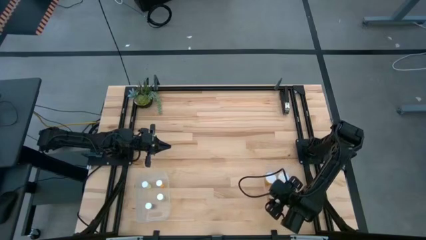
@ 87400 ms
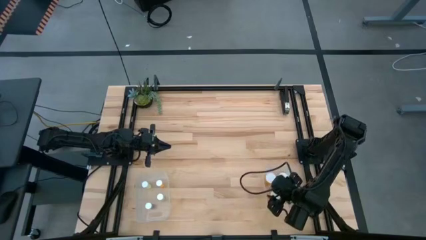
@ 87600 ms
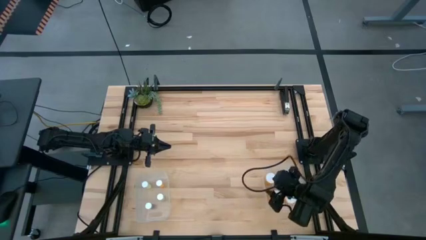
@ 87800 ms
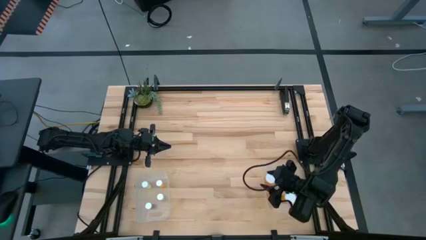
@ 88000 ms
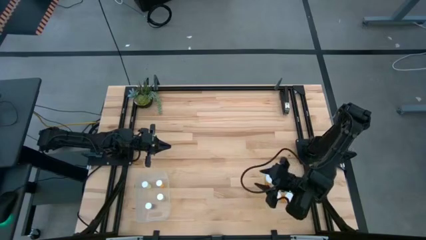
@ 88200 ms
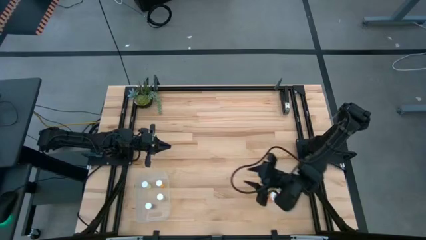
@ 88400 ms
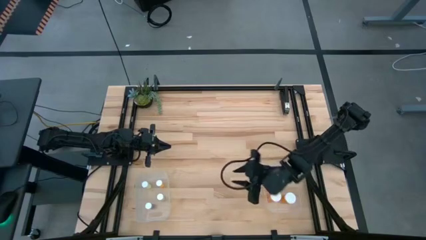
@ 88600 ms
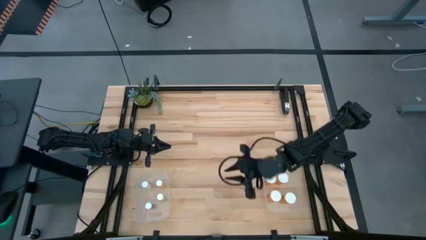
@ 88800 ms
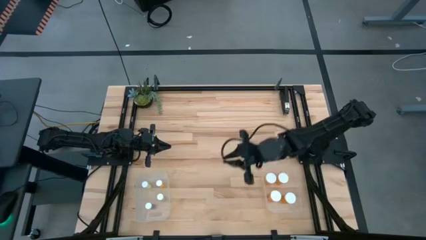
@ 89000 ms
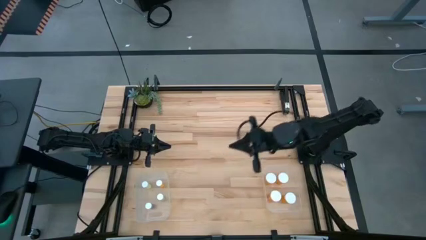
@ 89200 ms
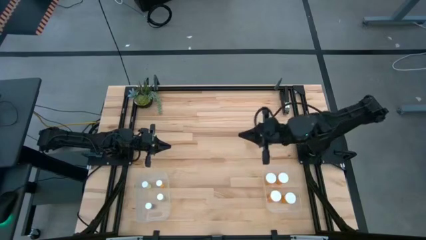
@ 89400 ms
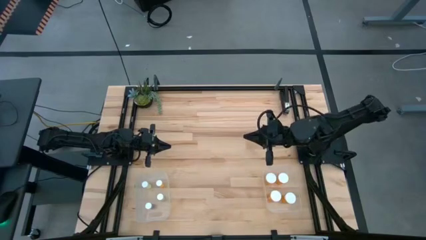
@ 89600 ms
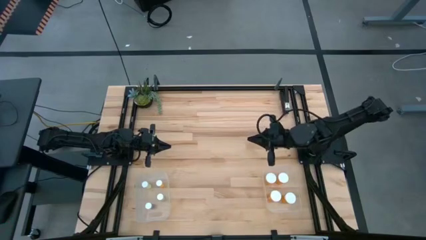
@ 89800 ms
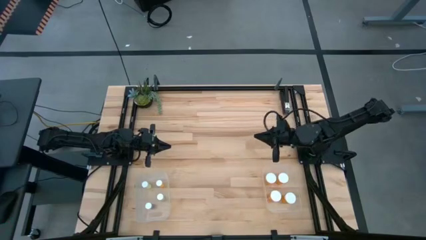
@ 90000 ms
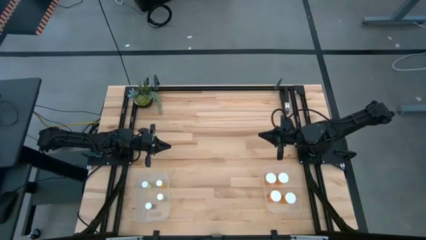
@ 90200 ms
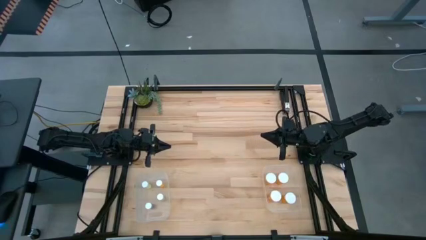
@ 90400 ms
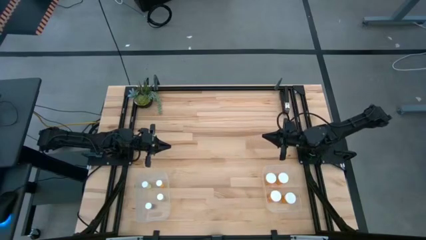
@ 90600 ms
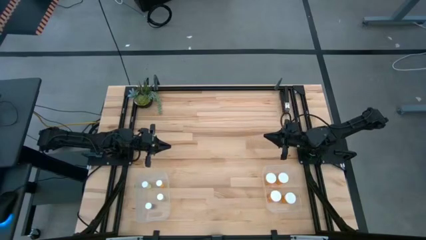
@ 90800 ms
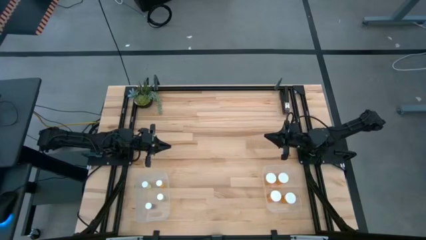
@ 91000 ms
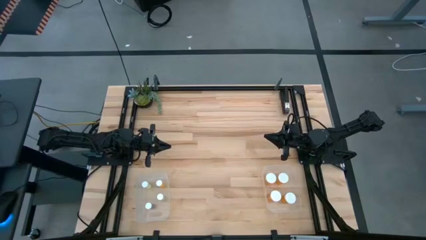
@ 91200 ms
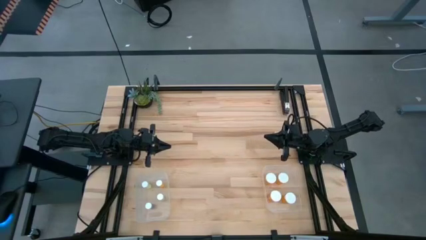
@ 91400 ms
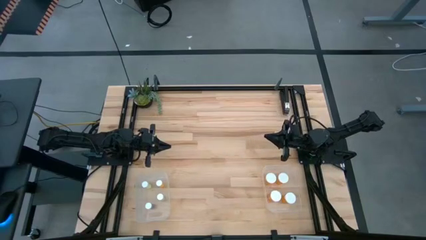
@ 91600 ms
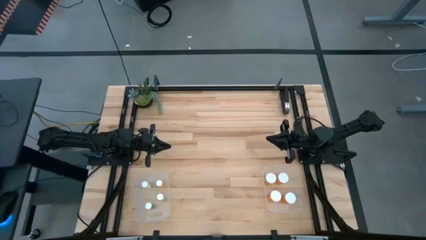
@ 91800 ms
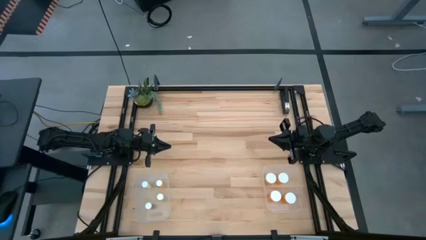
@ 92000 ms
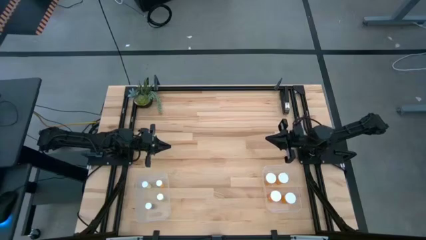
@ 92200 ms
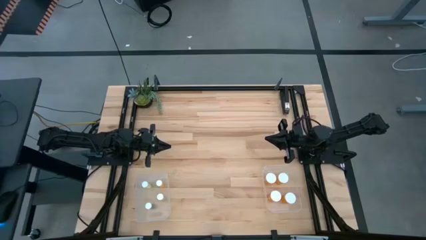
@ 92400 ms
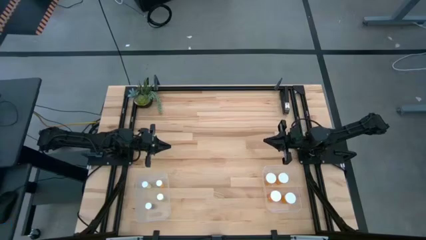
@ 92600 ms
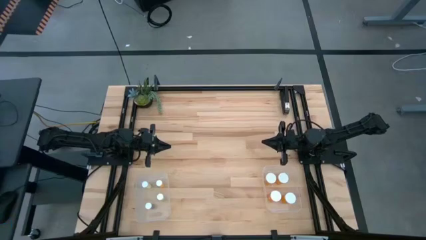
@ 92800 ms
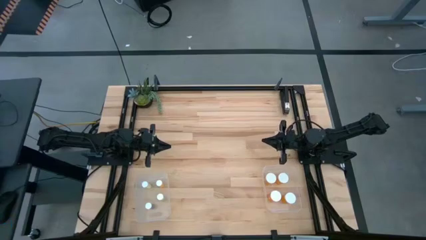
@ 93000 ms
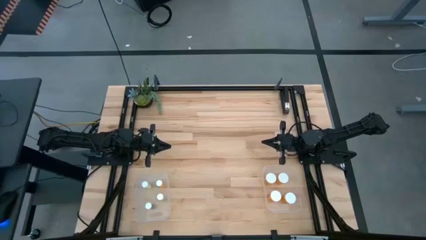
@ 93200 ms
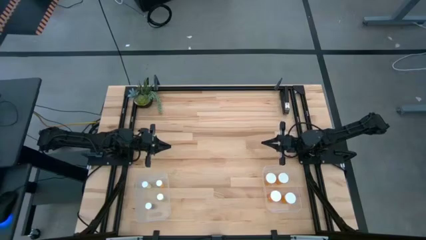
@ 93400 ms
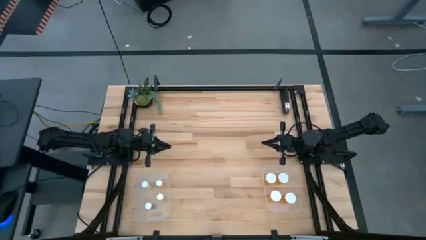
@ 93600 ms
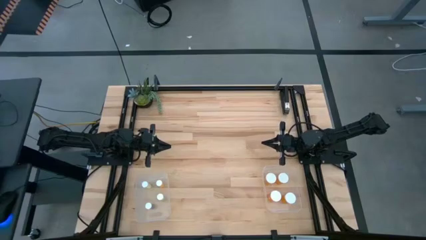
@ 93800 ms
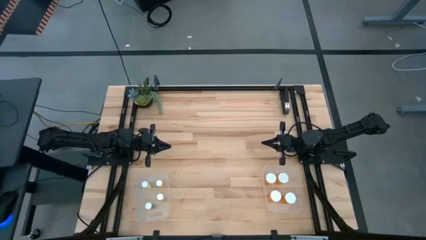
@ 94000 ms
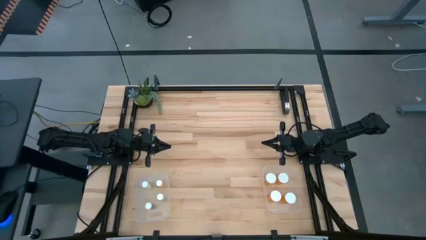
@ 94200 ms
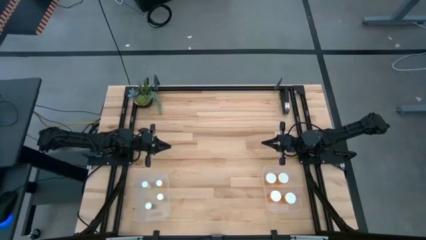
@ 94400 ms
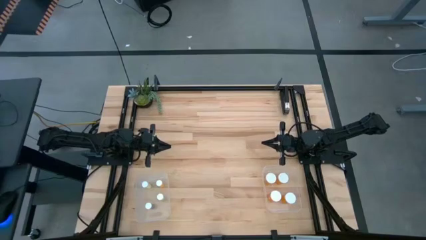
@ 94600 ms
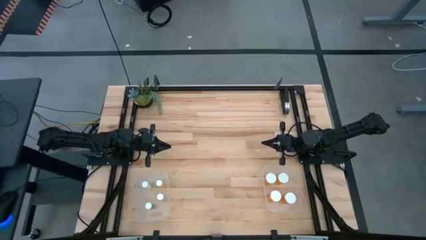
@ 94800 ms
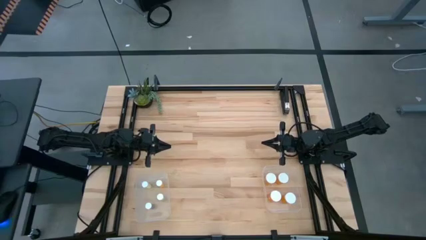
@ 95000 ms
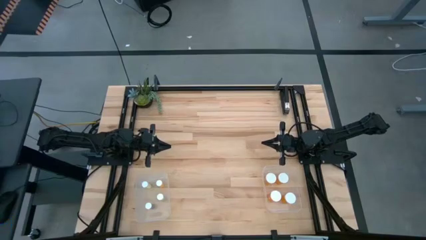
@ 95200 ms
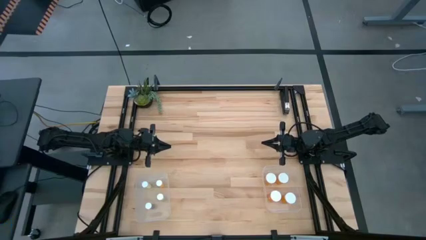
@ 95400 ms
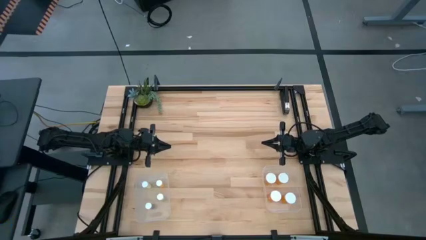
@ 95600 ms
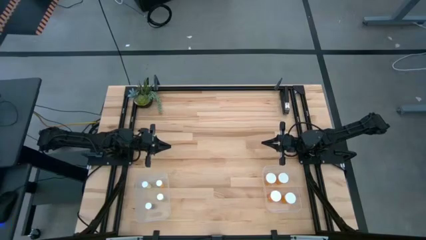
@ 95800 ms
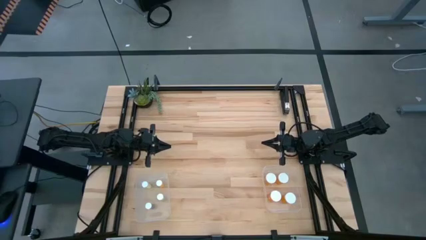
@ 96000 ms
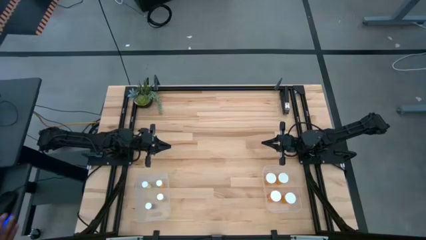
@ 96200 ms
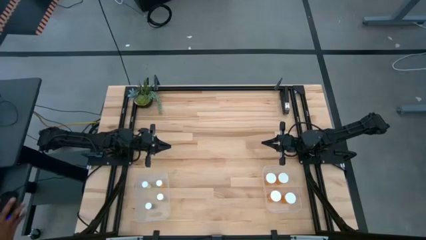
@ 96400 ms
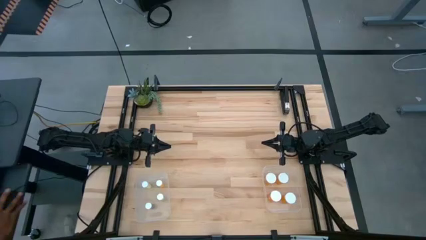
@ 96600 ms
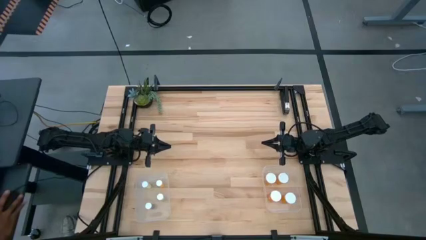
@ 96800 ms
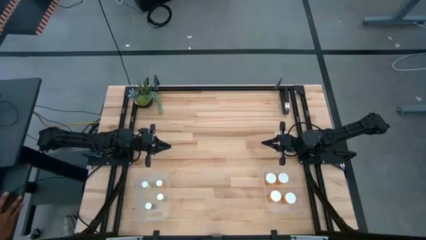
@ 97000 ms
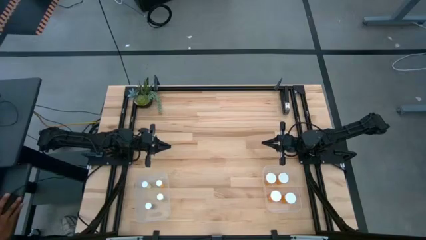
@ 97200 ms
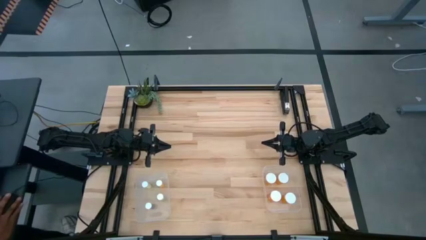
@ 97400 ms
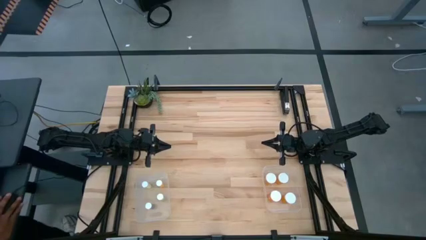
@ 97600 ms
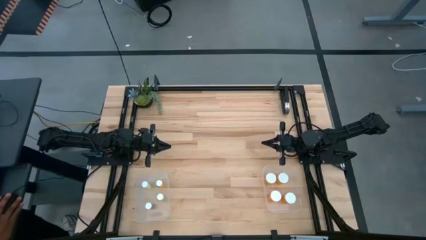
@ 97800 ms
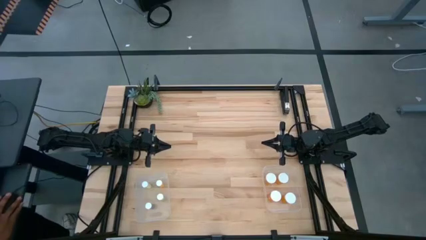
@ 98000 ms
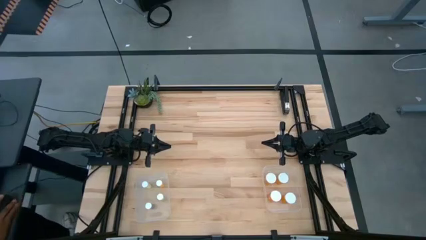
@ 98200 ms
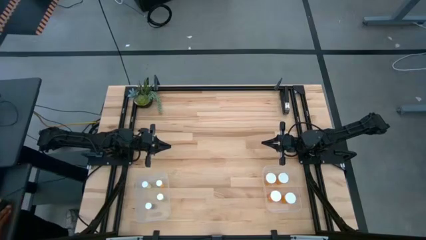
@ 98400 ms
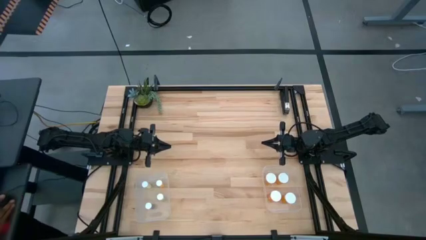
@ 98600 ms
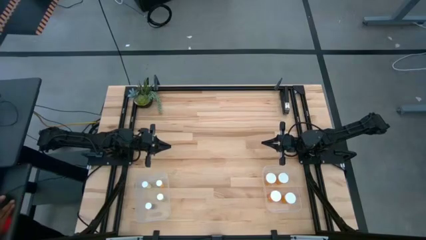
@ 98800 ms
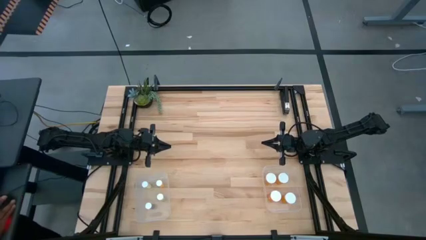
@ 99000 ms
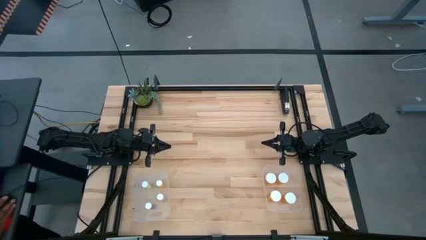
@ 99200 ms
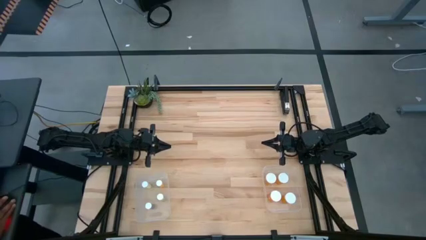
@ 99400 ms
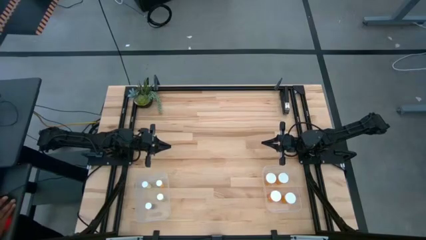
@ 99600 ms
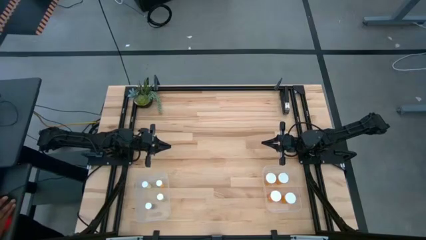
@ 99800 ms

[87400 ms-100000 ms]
Task: Pick and place medicine bottles into bin by pill shape (circle, oval)
Return to Home Position

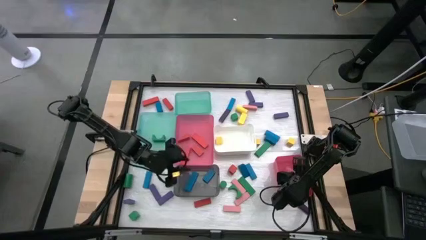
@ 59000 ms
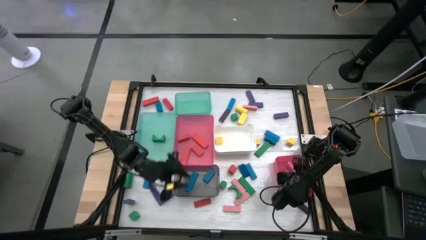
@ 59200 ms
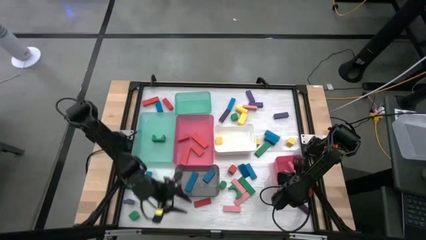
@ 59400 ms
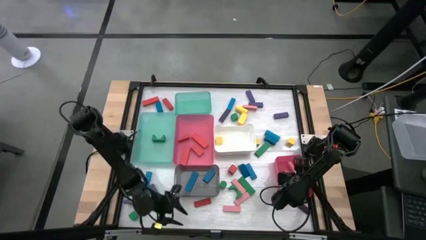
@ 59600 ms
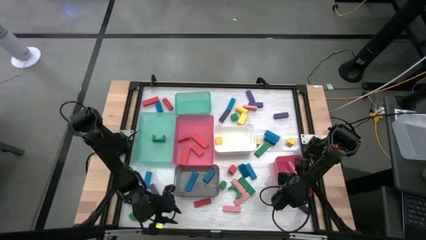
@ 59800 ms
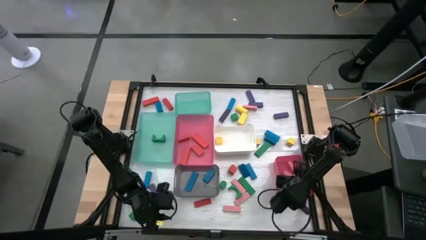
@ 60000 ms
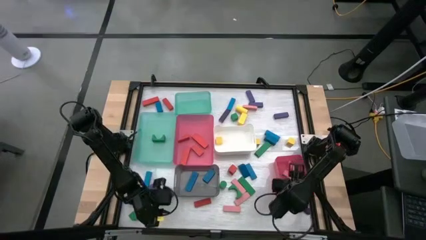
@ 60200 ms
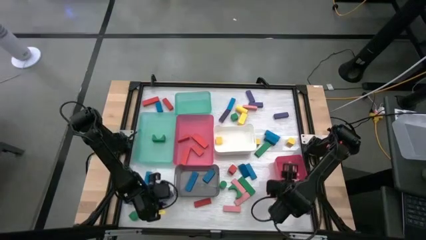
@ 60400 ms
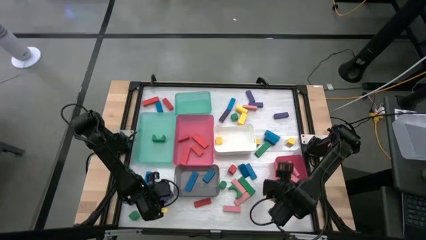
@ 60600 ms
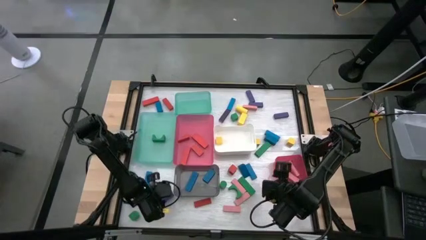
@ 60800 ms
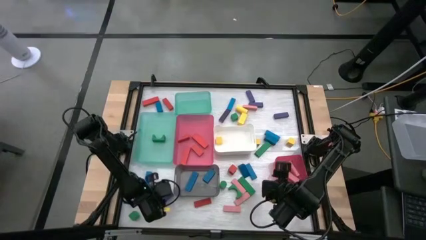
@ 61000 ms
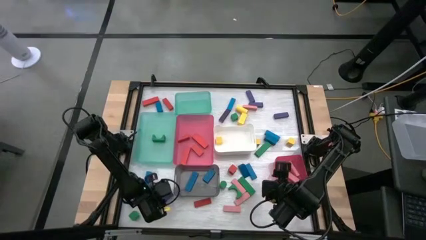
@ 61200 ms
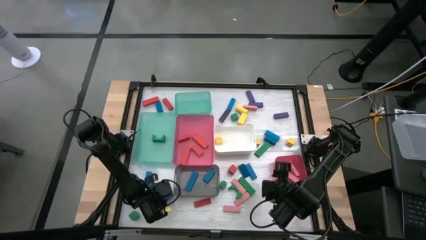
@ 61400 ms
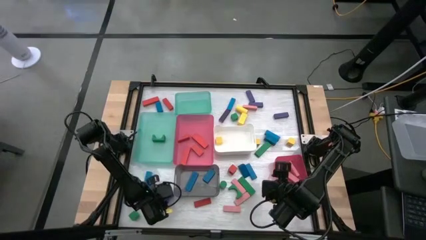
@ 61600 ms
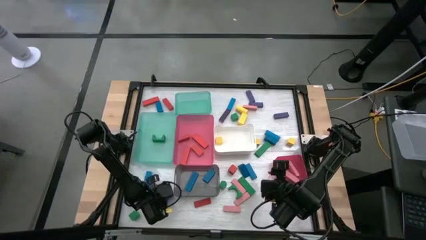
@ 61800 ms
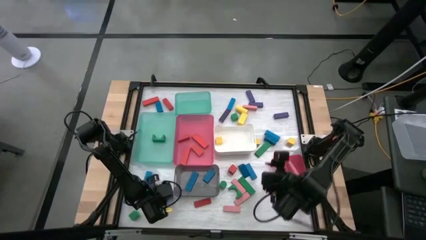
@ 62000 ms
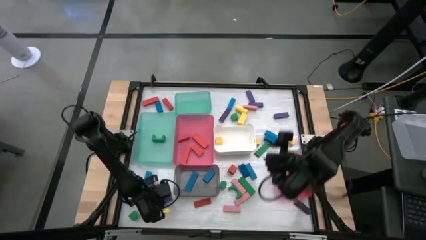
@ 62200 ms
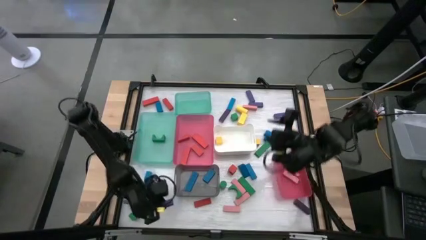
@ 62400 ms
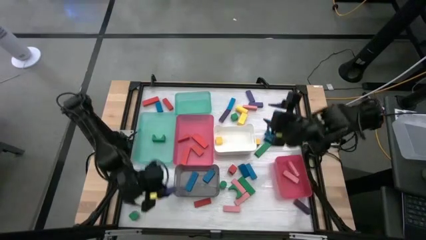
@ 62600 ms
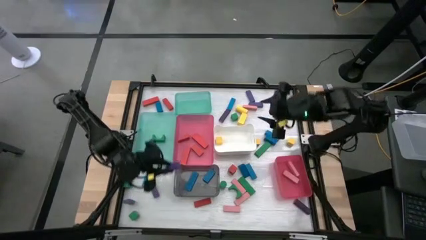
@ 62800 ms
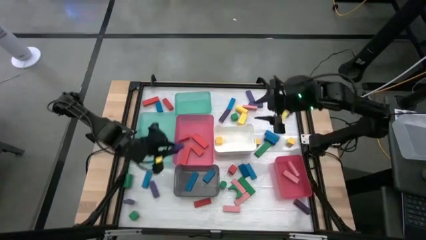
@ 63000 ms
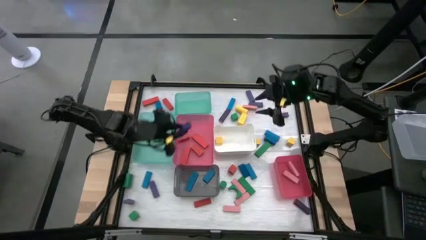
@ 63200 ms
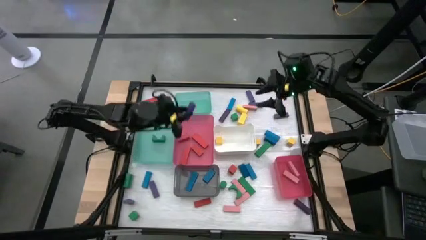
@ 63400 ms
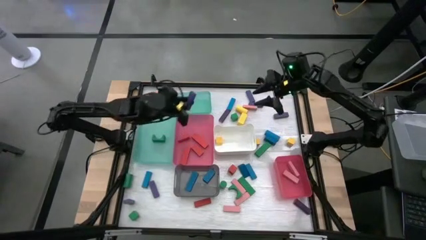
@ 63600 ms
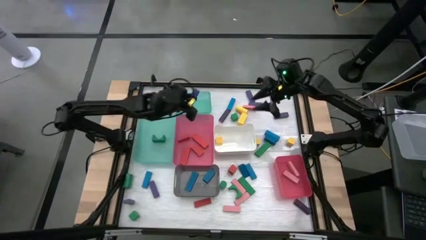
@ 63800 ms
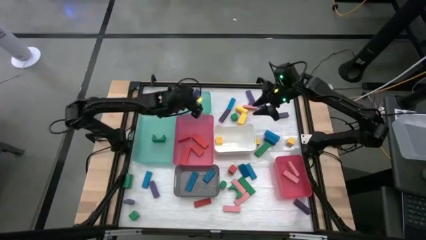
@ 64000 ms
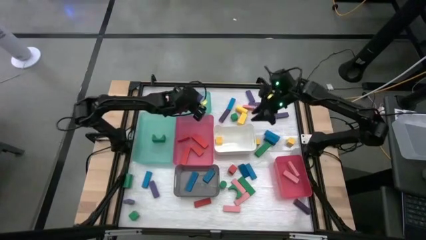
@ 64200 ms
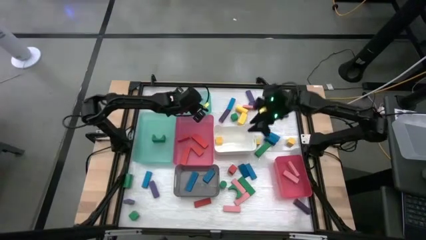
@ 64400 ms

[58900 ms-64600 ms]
Task: Sort blocks
Put the violet block into the top green bin
